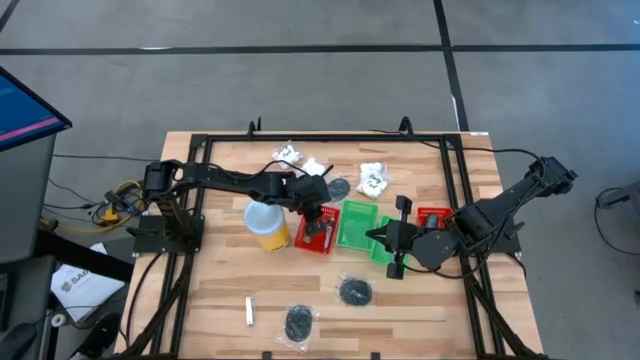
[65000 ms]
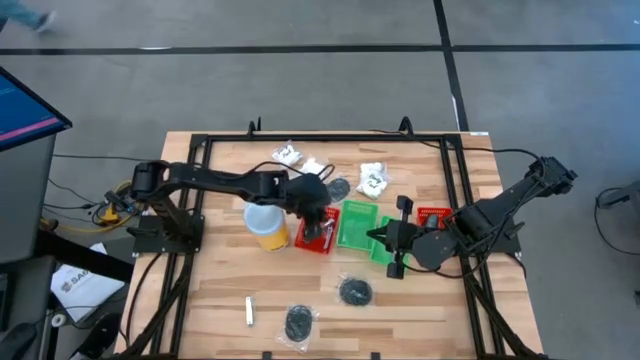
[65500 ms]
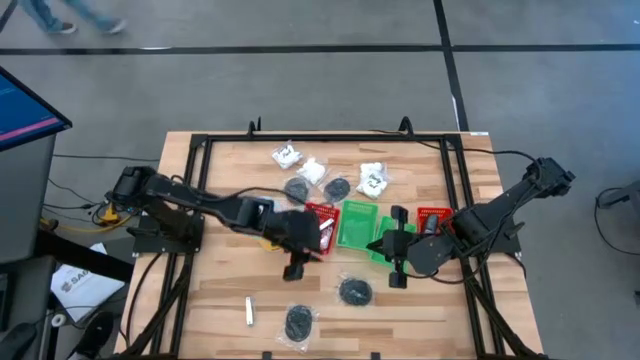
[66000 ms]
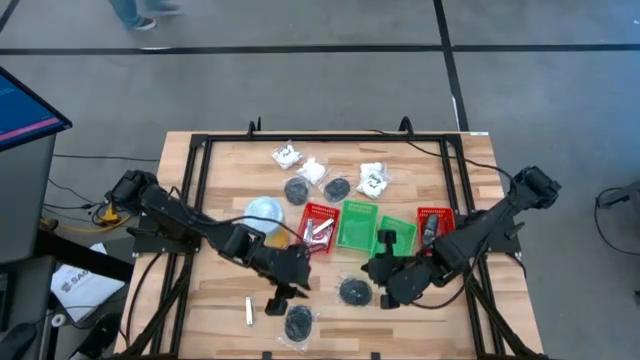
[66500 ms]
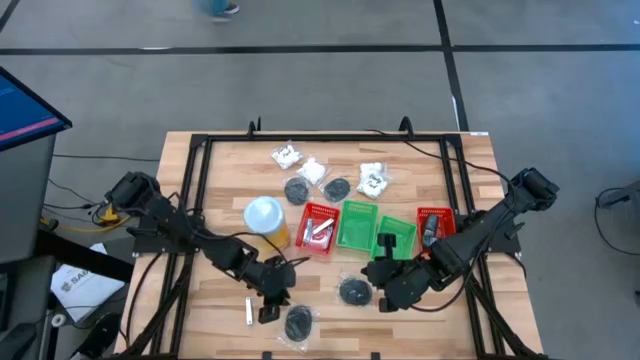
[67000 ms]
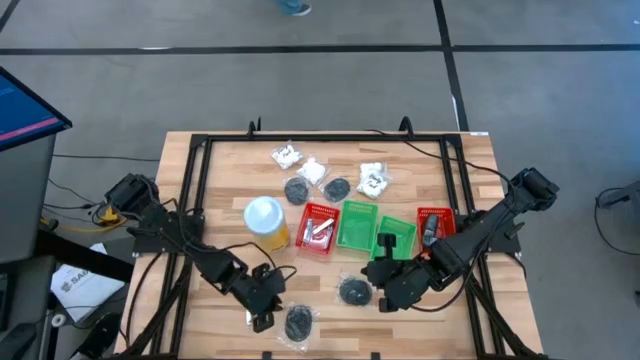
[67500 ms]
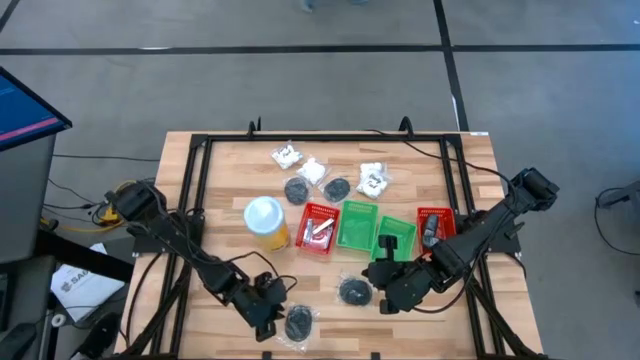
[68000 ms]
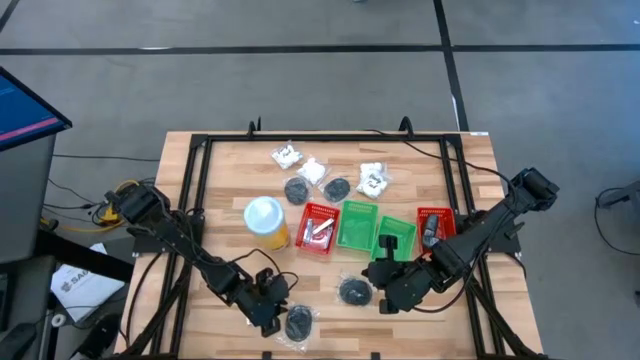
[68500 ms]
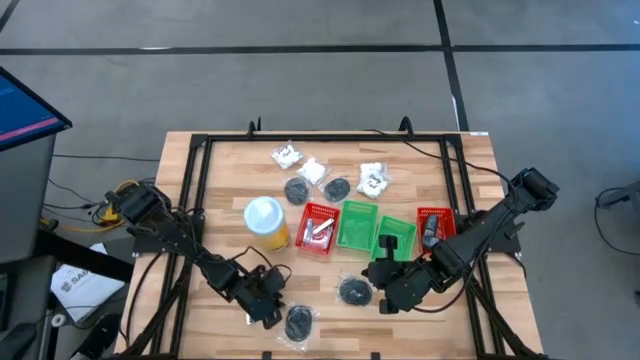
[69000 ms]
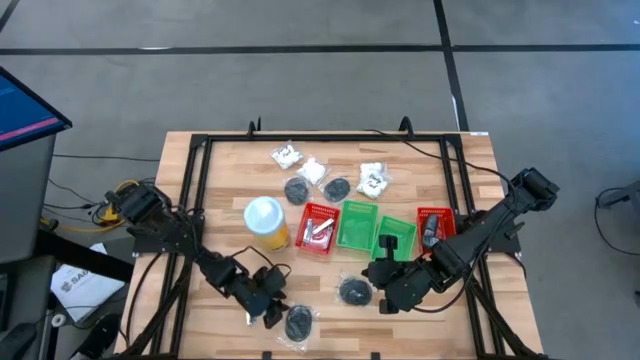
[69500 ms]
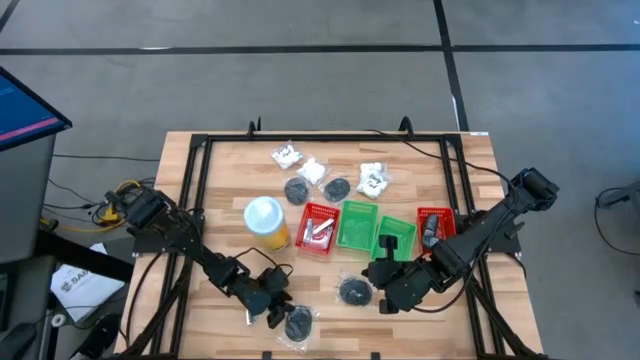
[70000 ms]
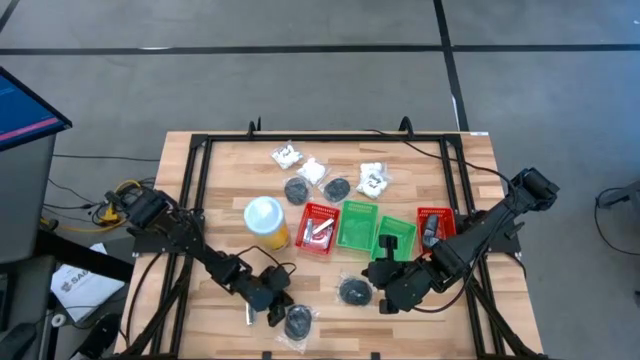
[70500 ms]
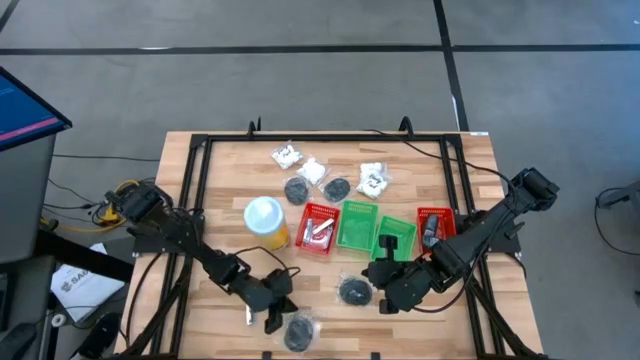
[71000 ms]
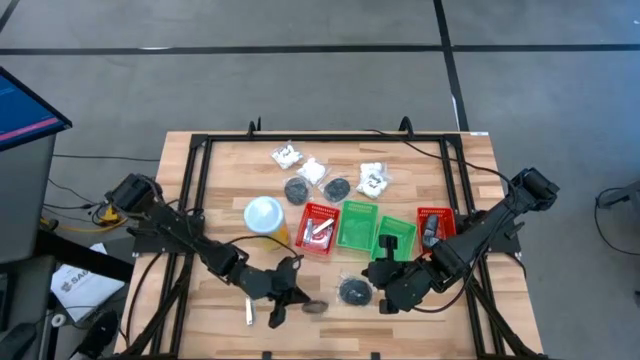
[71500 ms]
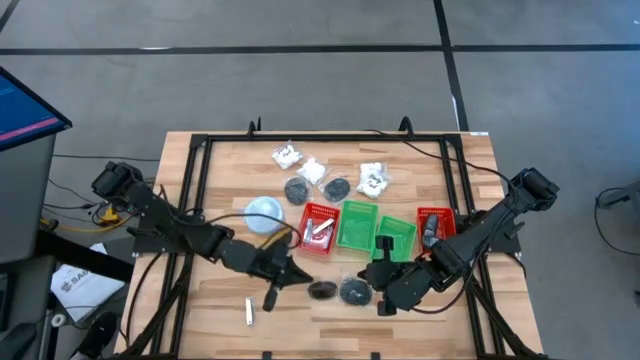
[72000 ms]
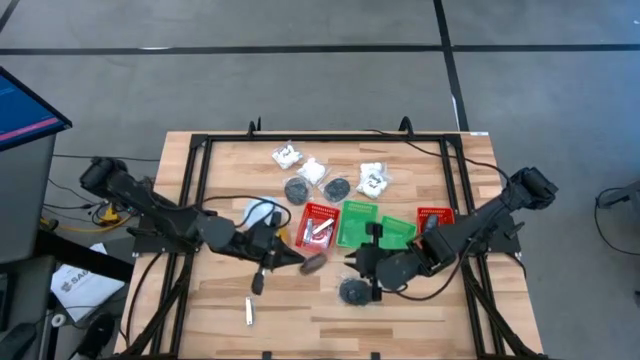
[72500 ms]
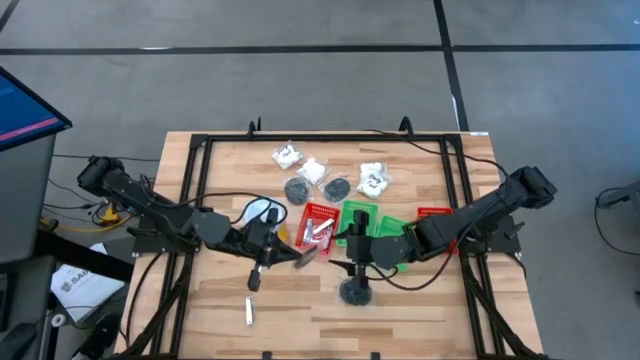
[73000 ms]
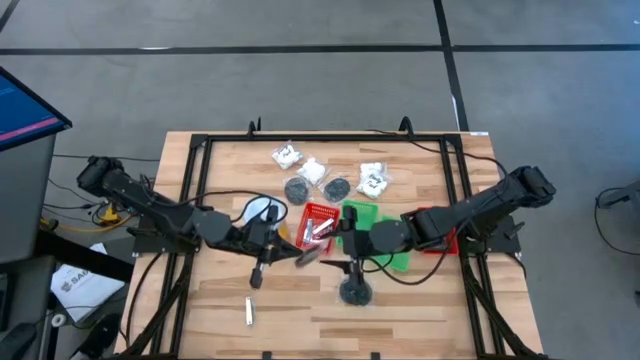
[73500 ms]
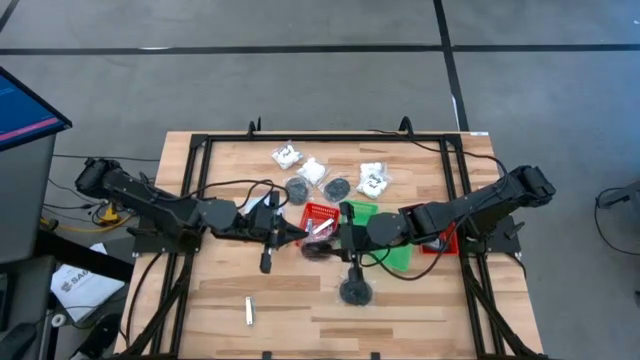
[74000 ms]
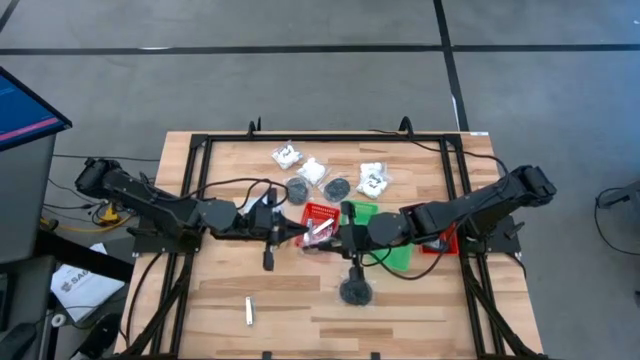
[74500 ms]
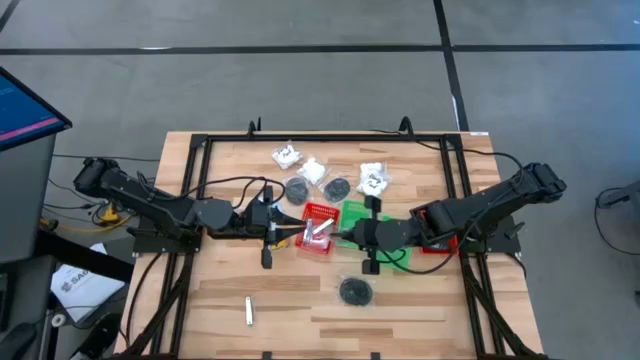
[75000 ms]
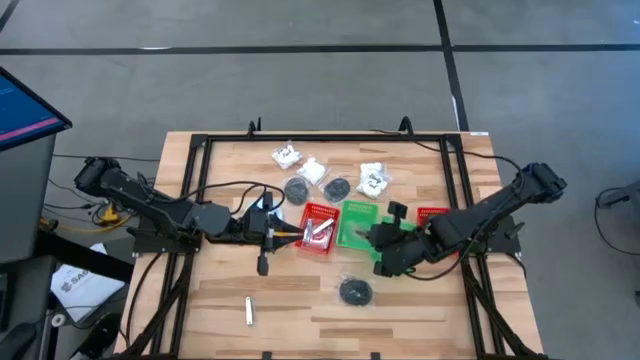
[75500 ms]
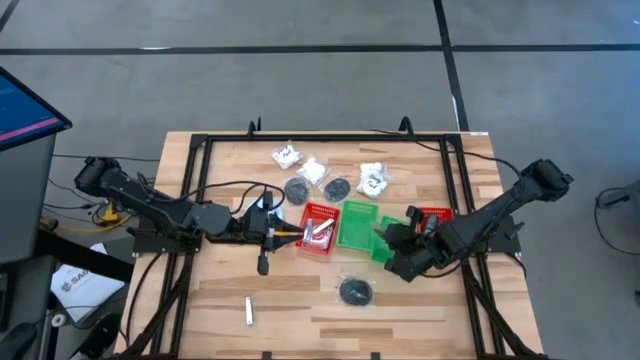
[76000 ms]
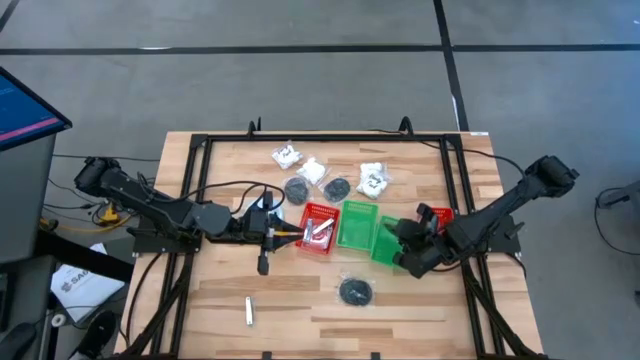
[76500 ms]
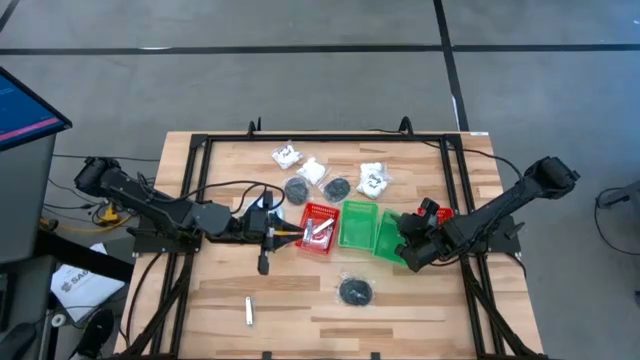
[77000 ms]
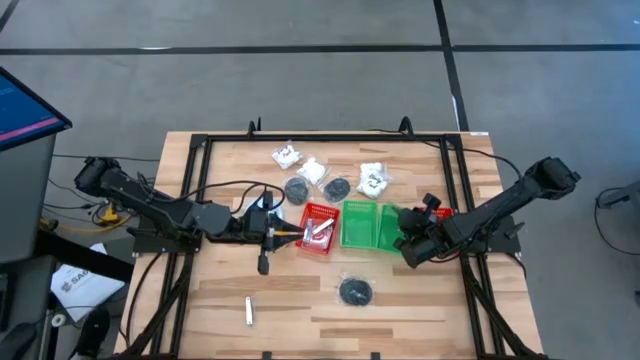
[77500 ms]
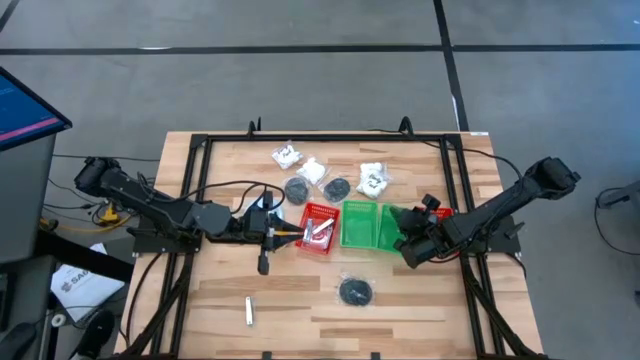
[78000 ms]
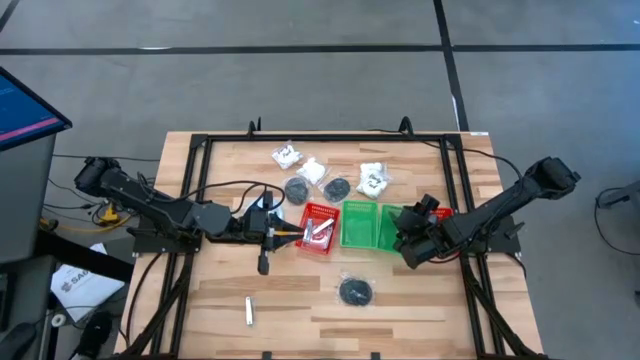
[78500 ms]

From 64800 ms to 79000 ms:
Task: Pick & Place Travel size toiletries
Put the black hairbrush into the right green bin

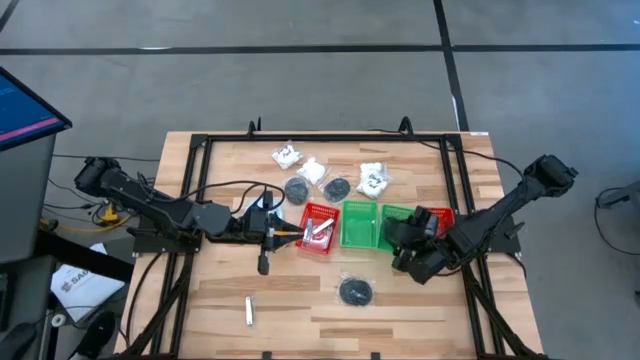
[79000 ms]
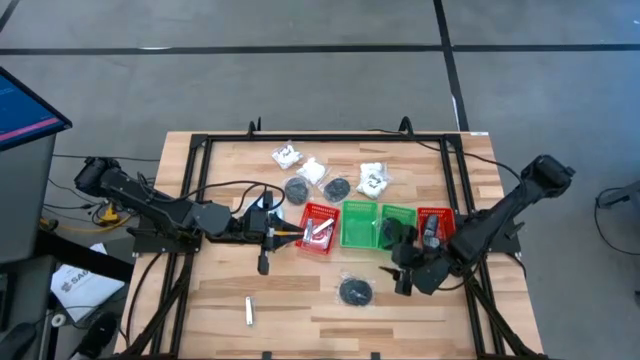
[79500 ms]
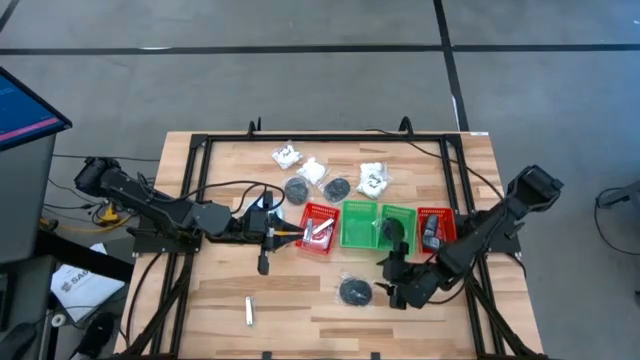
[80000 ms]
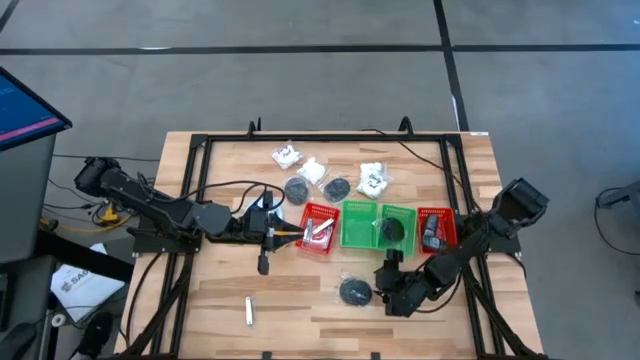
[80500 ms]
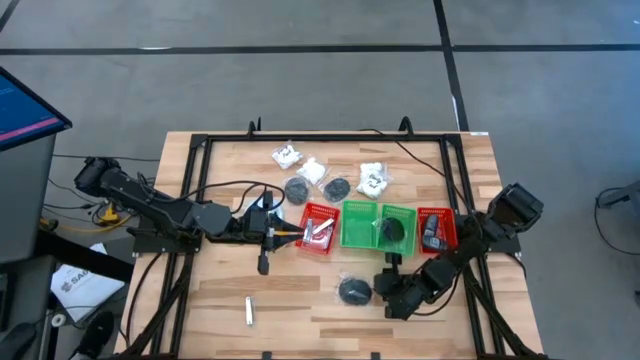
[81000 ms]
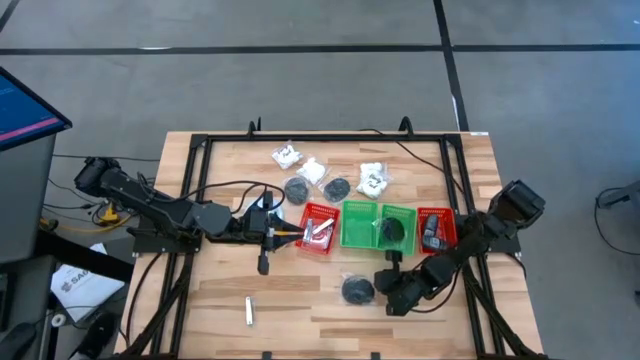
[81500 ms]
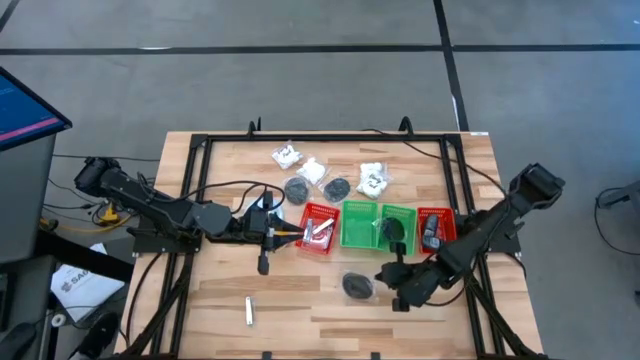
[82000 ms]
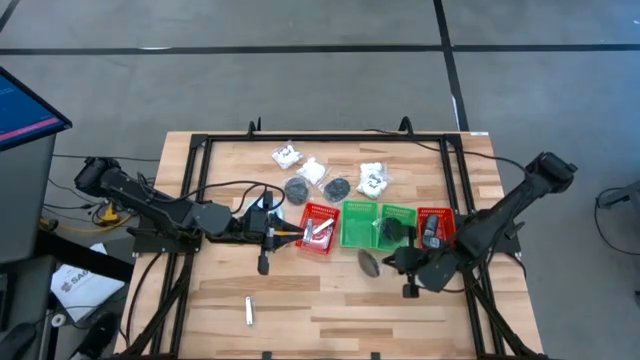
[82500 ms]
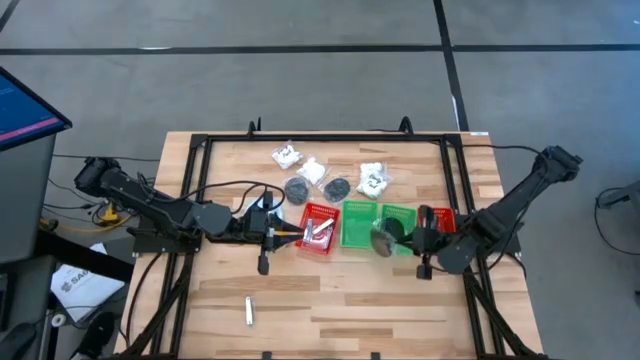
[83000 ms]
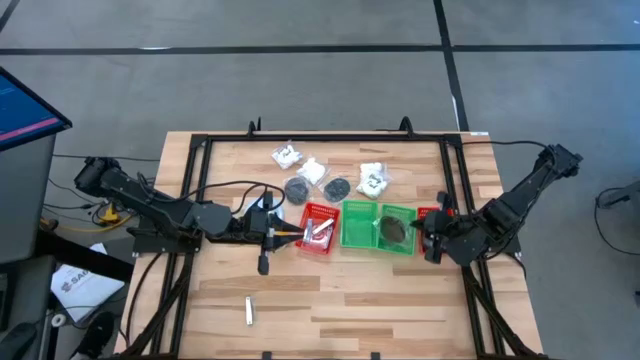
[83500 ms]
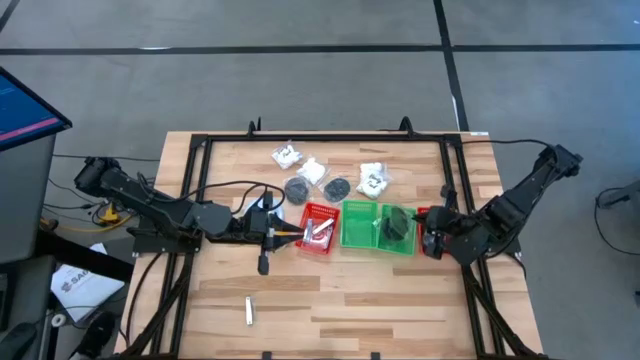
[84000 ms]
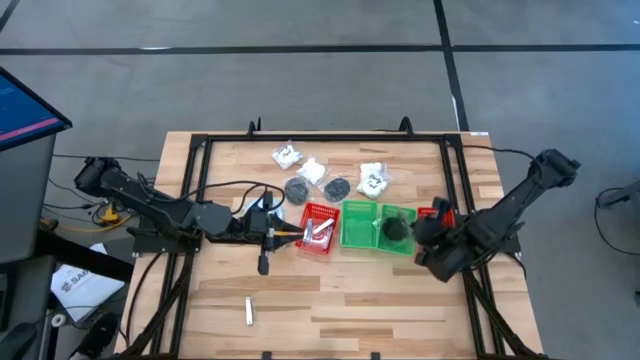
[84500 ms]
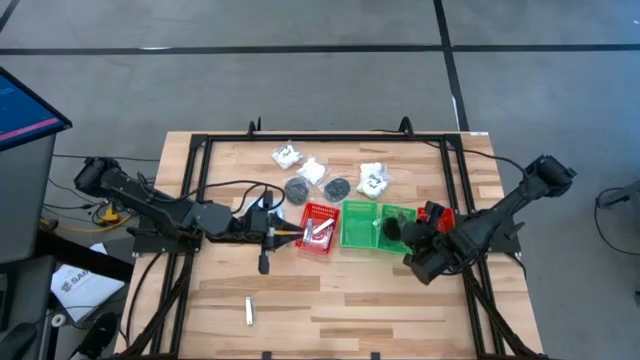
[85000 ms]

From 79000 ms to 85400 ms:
Put the black hairbrush into the right green bin

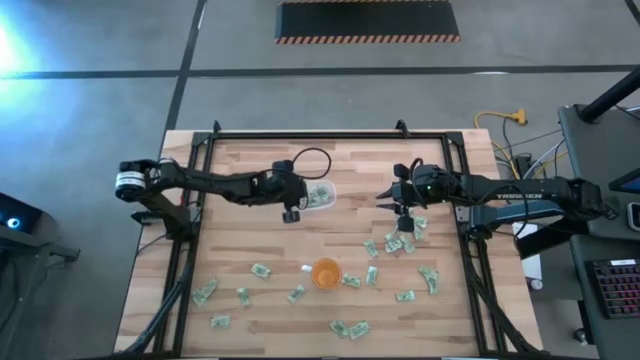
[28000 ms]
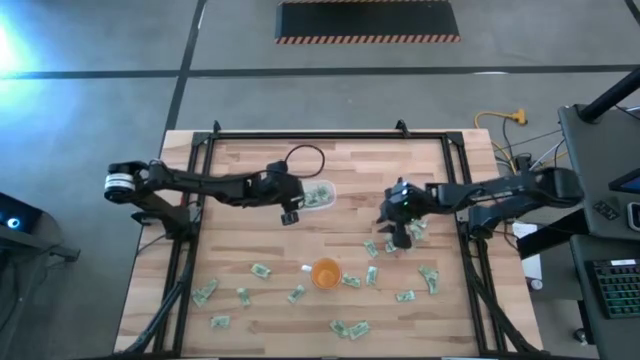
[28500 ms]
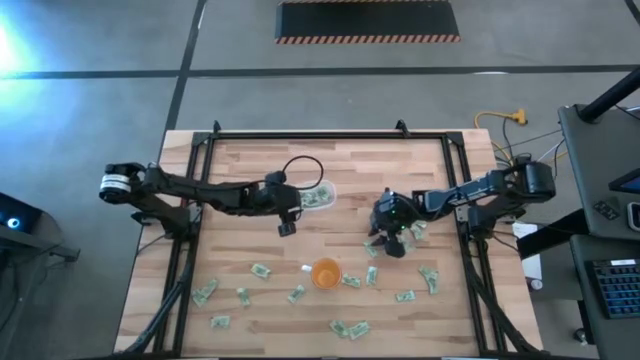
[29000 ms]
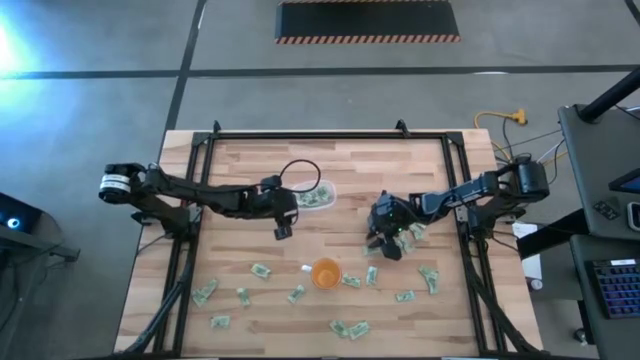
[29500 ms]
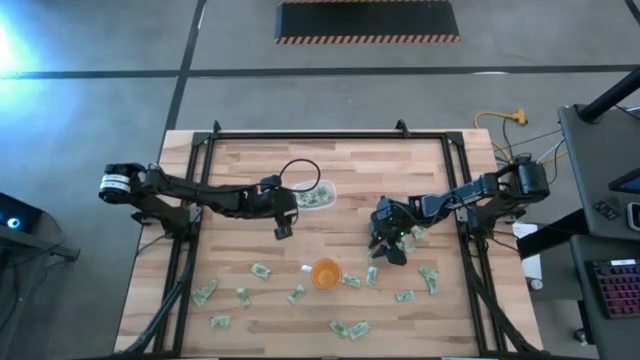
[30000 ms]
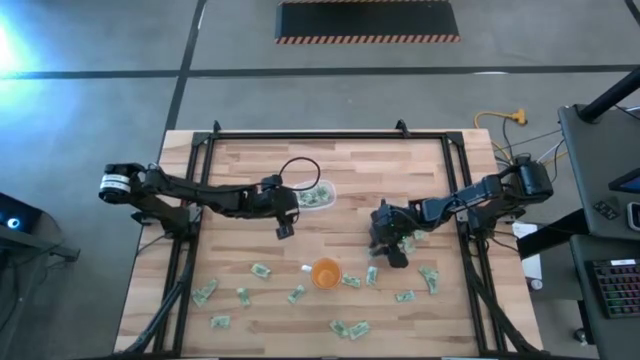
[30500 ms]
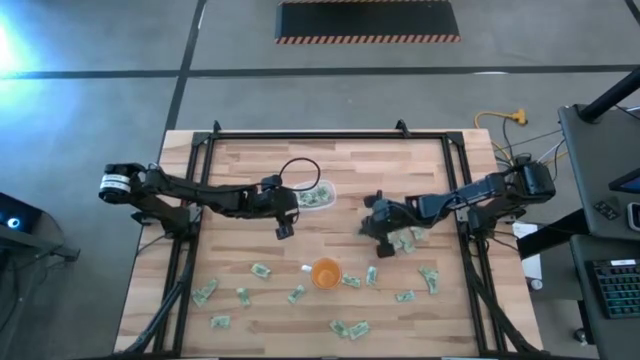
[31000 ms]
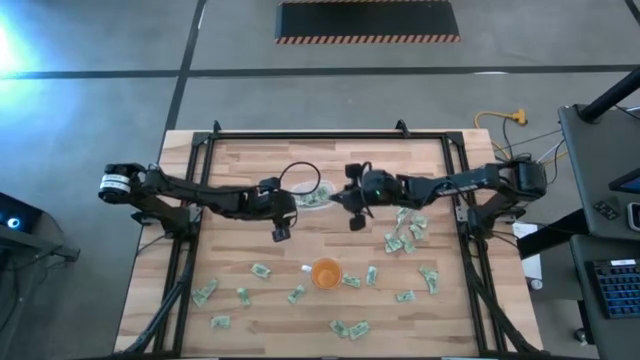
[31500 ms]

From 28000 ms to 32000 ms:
Task: Pick and place Stevia / Truvia into bins
Put the stevia packet into the transparent bin
